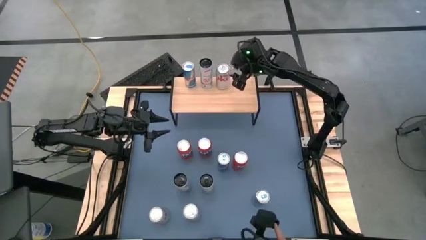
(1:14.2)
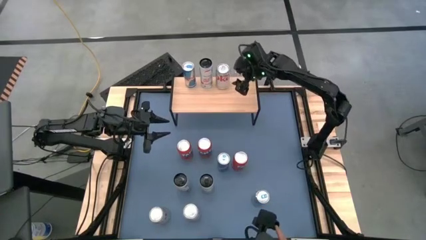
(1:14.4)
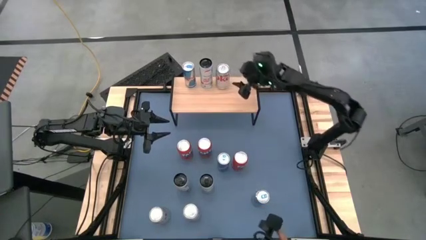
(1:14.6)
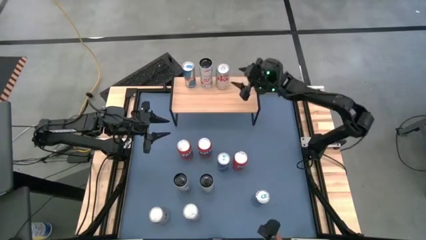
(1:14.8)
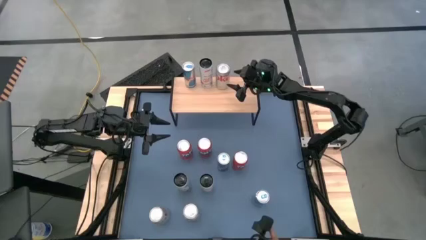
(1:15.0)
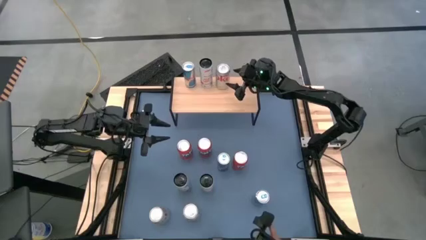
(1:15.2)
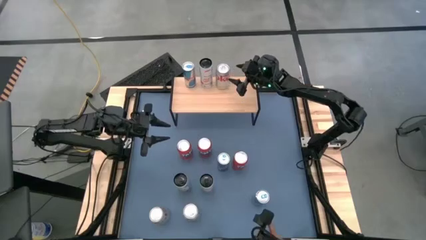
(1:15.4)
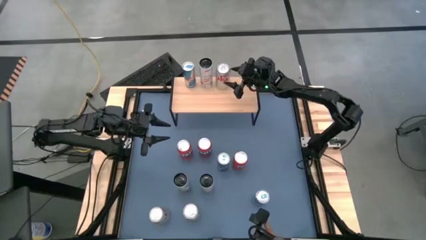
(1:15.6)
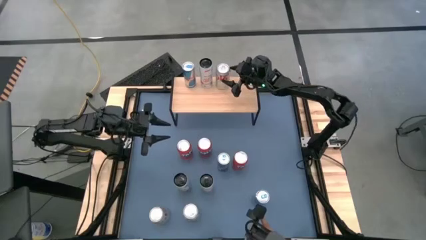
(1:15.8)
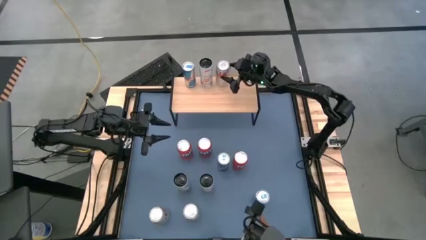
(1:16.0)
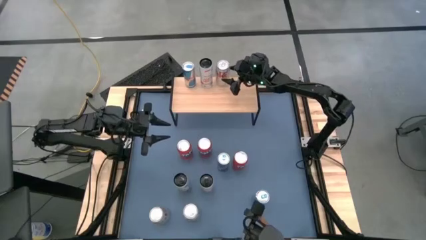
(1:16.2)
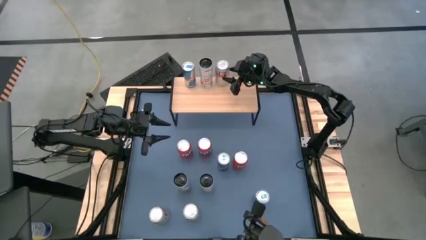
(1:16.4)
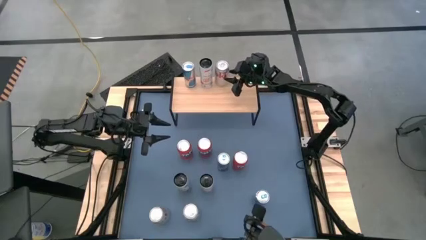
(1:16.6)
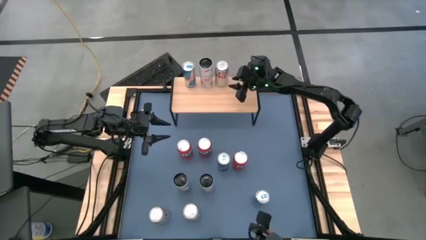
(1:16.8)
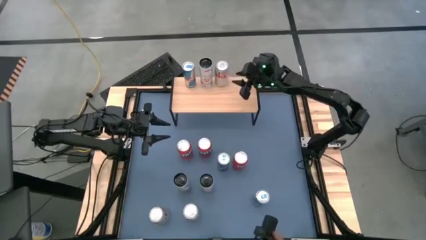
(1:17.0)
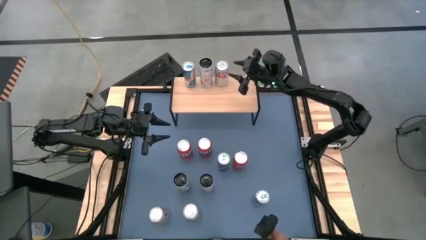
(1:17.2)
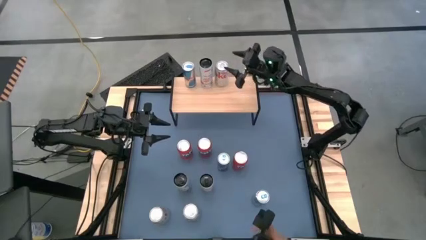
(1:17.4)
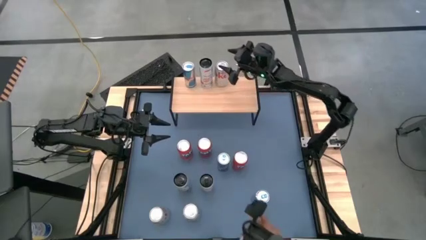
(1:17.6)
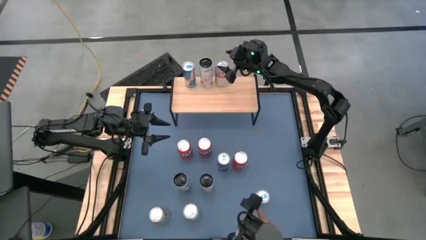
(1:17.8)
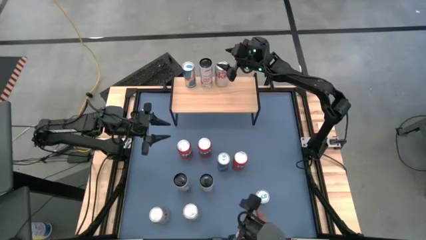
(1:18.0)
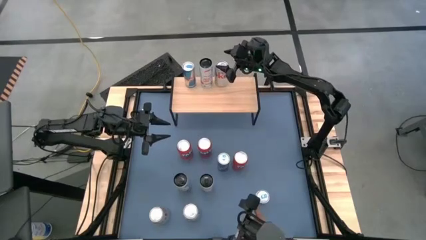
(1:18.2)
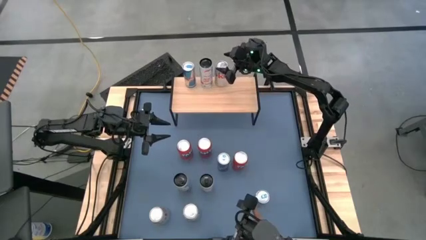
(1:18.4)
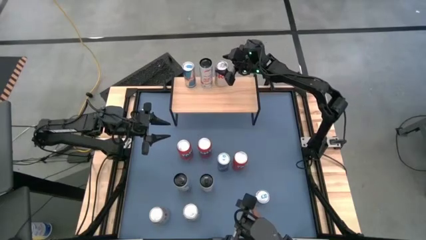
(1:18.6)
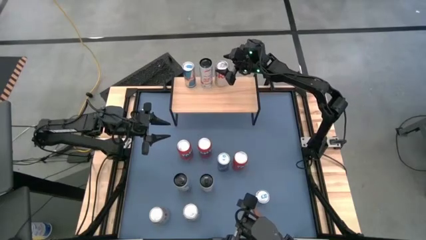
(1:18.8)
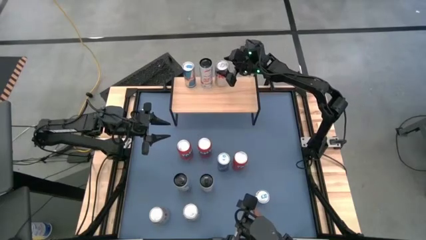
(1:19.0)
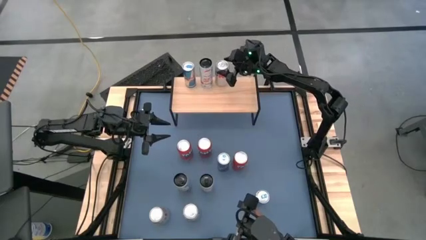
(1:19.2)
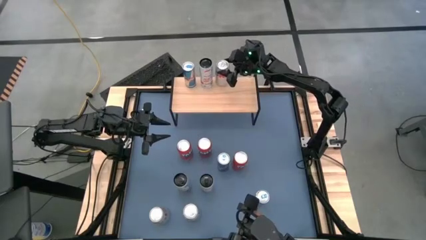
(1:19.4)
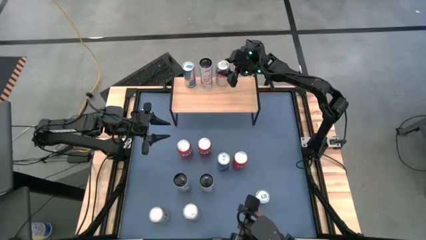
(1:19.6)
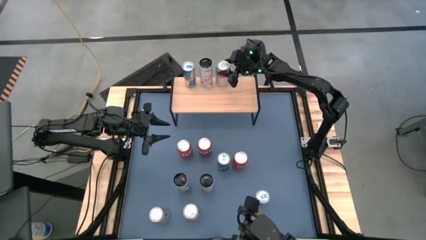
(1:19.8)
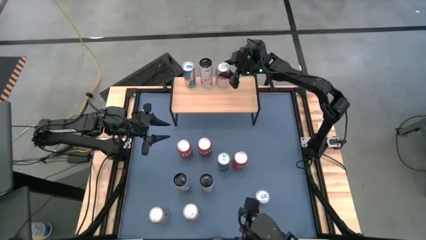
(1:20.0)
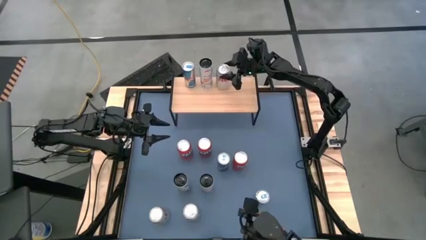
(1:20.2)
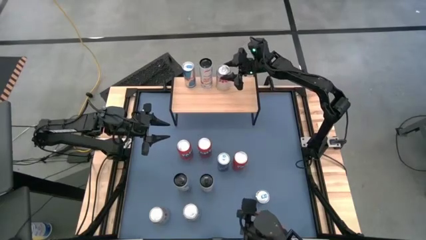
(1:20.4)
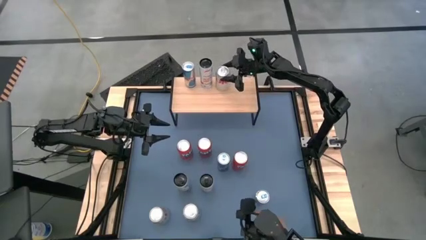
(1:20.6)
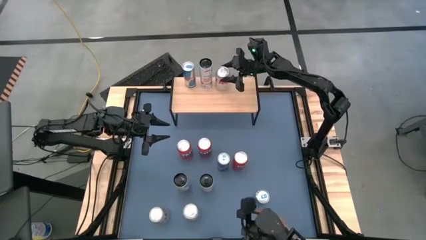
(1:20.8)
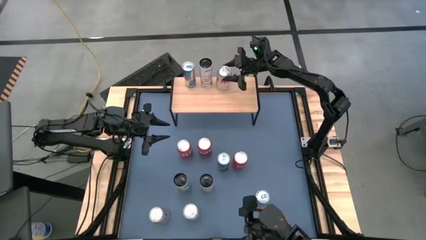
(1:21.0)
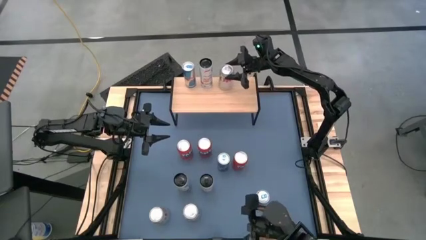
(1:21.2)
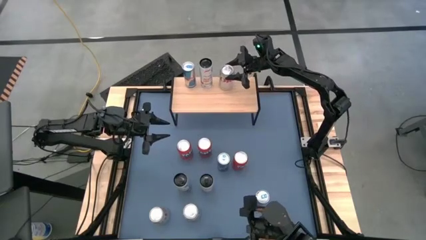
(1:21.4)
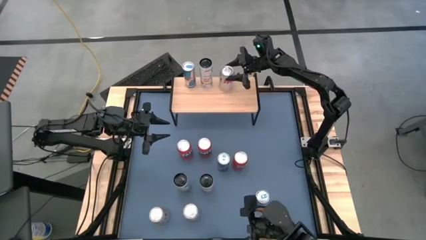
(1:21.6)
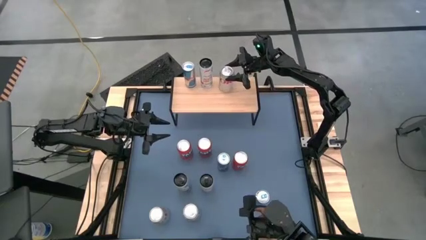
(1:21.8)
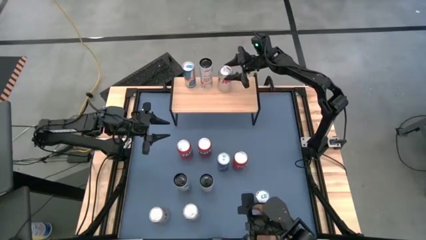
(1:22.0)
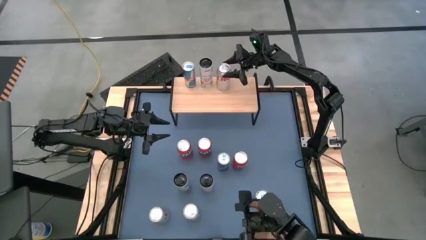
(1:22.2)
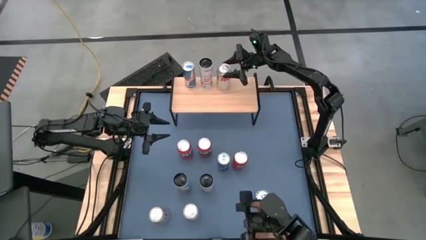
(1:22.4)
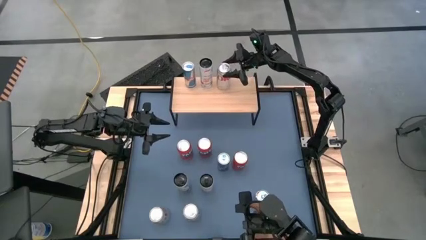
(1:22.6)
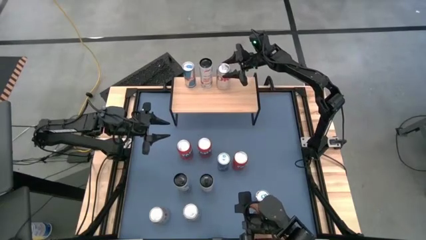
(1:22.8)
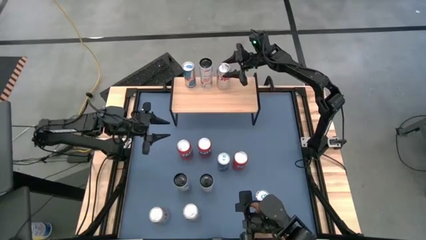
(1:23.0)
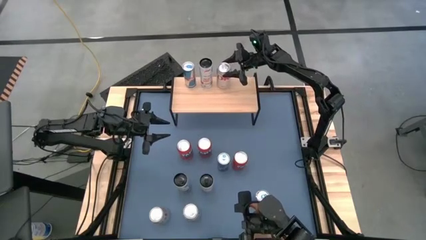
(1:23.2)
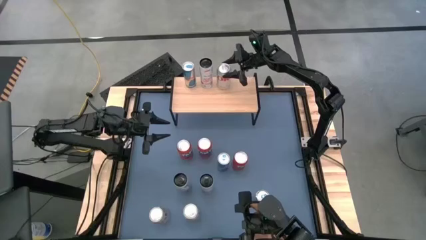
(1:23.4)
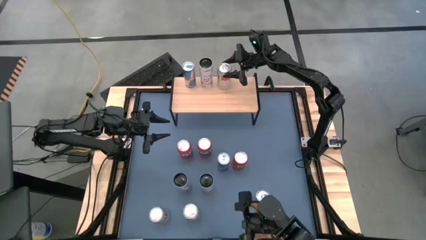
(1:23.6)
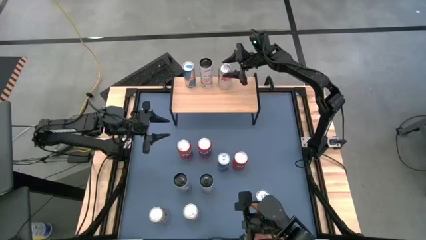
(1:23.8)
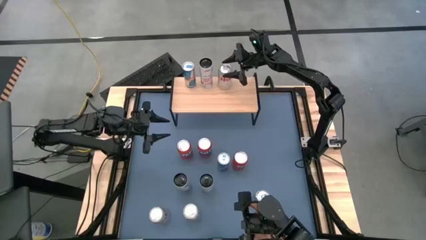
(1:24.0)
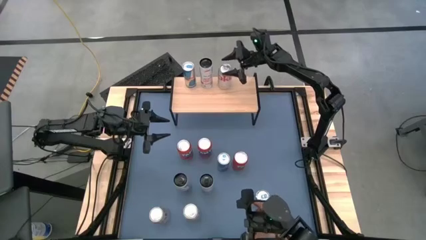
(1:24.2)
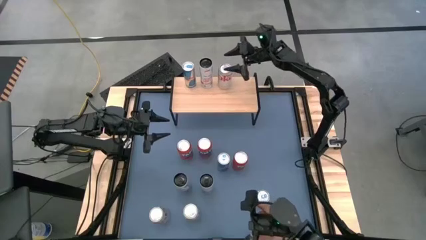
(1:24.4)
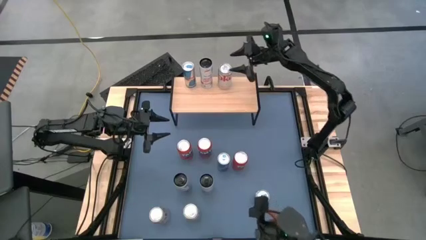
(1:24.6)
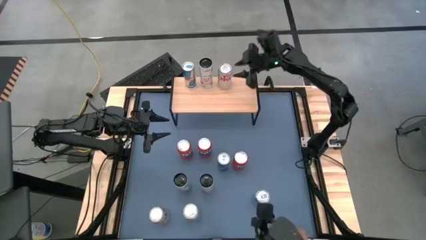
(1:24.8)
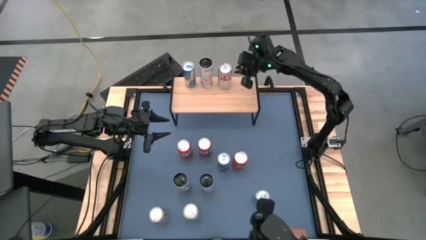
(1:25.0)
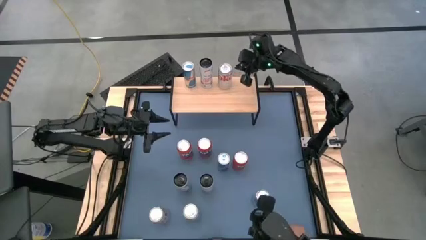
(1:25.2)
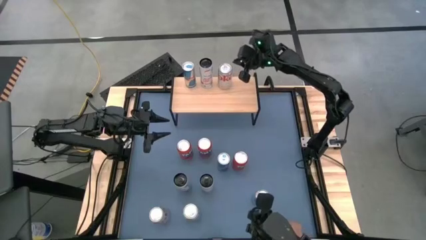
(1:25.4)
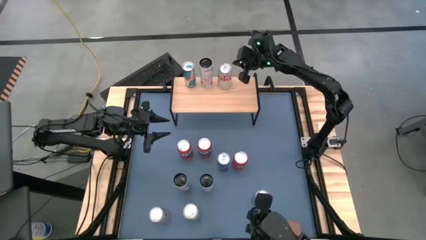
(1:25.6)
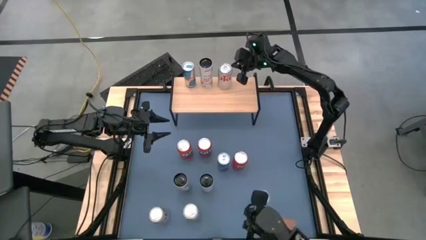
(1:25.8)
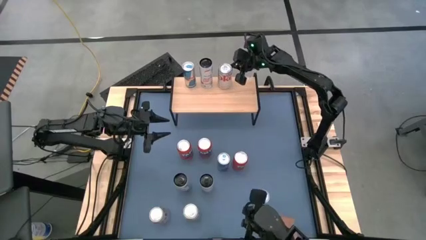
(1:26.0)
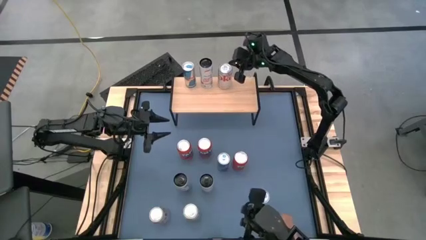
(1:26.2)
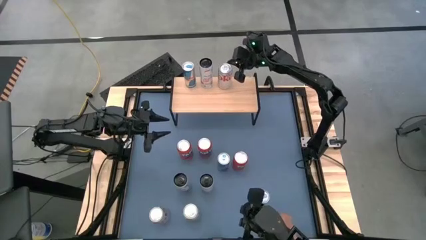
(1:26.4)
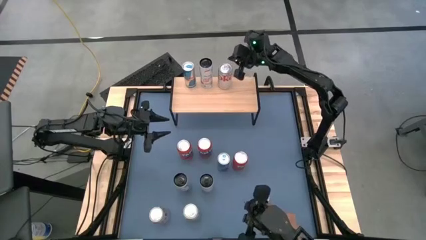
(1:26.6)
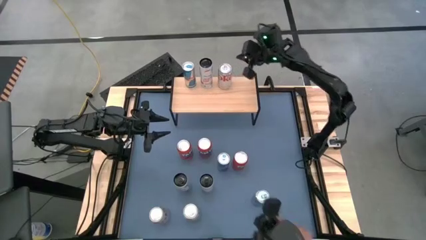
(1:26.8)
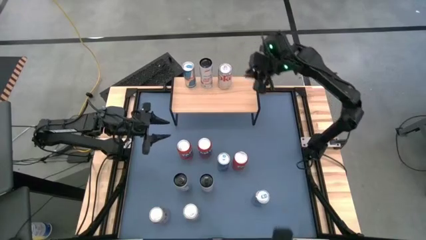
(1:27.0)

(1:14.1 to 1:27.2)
Task: Place canned beverage on shelf
Put the right silver soda can on the shelf
